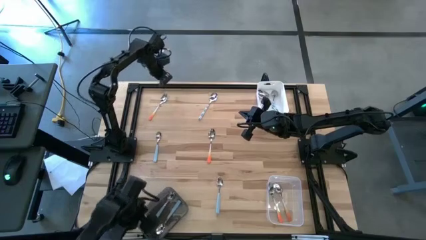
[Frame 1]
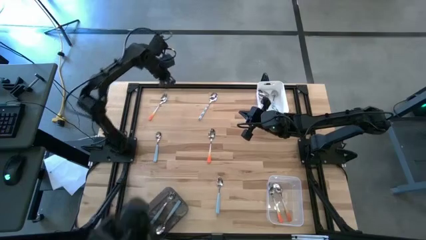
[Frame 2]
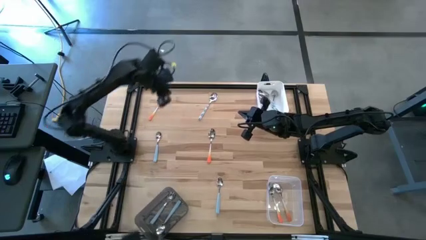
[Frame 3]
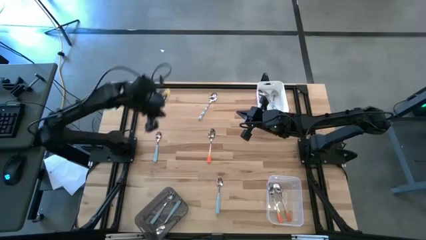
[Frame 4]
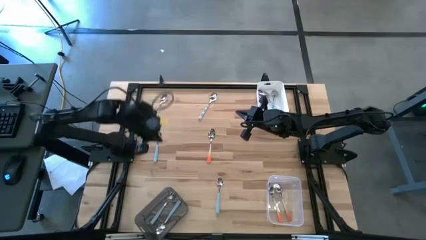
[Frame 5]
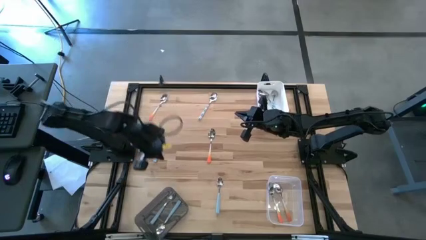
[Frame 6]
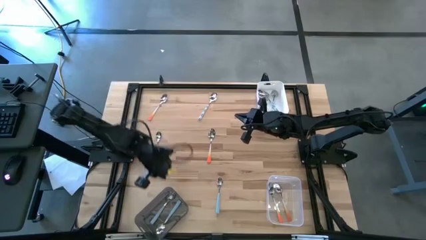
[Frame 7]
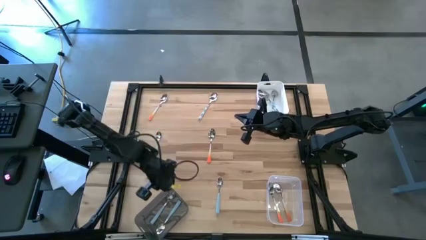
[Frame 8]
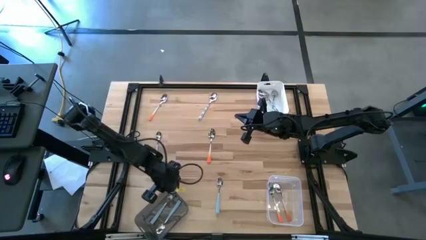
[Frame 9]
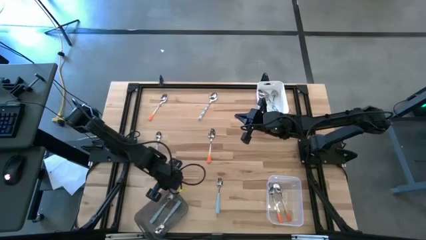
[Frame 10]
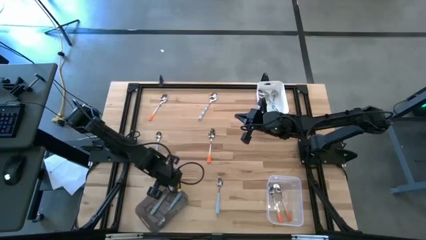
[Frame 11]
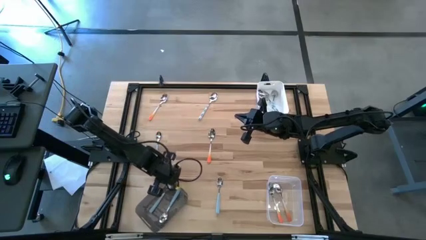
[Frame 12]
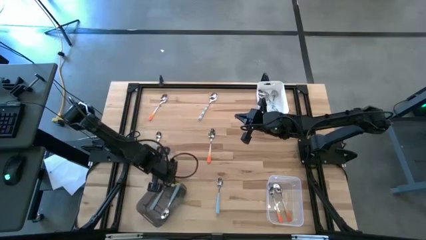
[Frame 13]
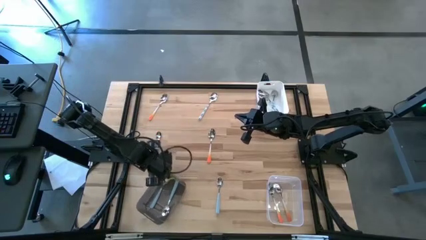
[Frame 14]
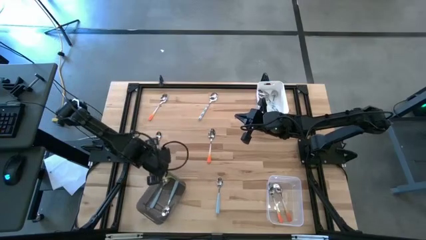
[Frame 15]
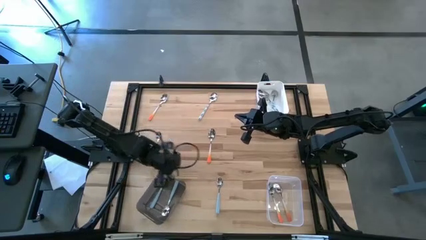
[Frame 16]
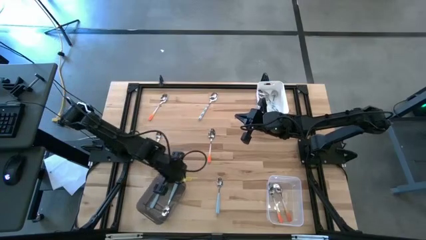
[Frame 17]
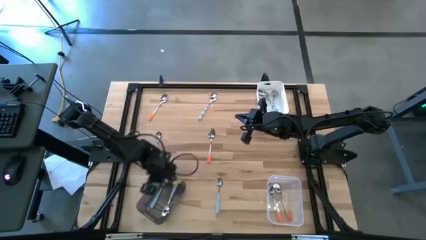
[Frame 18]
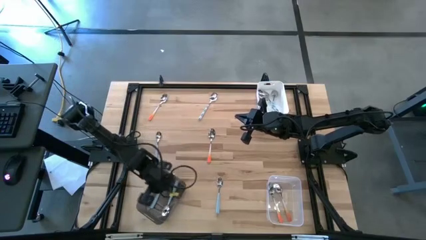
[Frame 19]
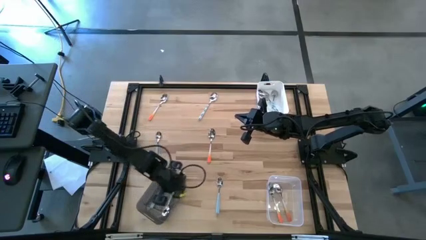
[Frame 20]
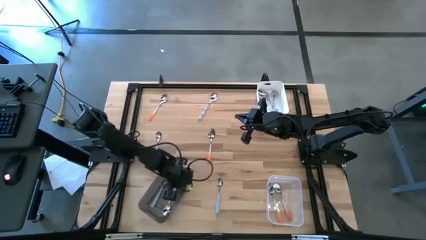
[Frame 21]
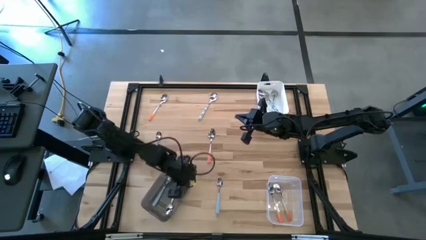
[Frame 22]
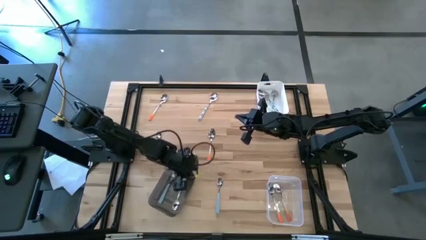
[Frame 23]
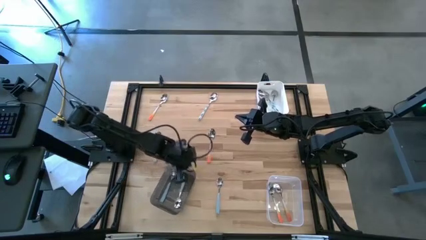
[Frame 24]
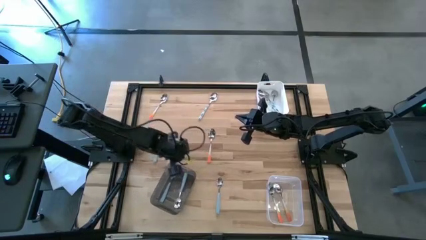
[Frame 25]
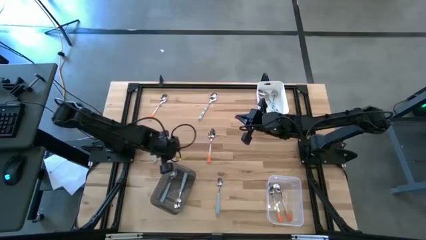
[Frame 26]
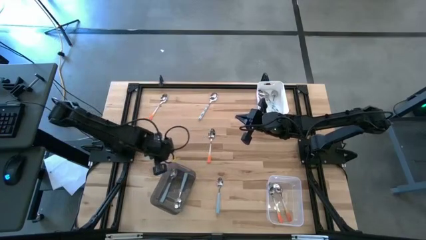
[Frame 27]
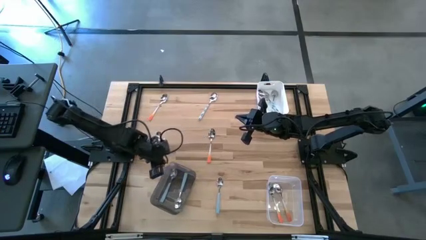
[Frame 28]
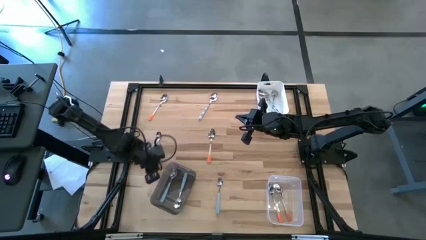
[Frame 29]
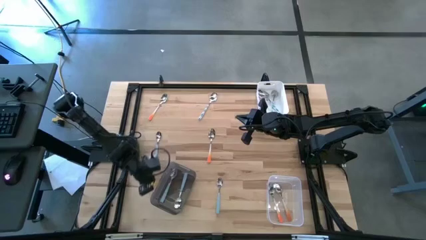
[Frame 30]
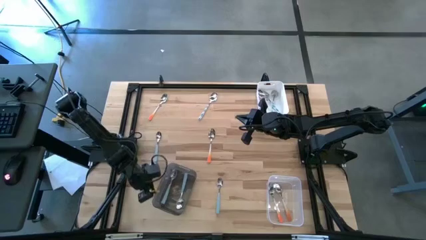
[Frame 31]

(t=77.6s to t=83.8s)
Task: Sort silverware by color (type)
Adjust the black bin

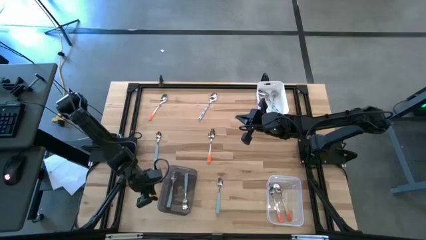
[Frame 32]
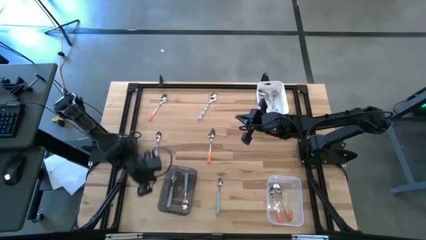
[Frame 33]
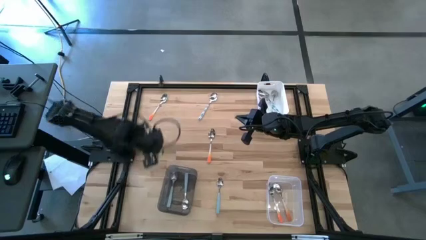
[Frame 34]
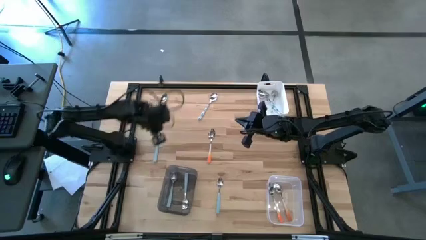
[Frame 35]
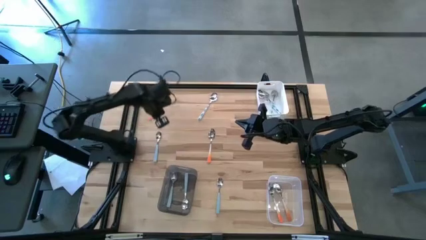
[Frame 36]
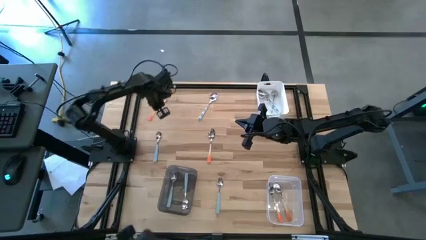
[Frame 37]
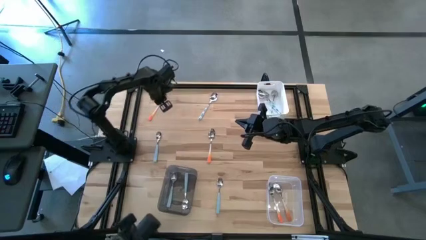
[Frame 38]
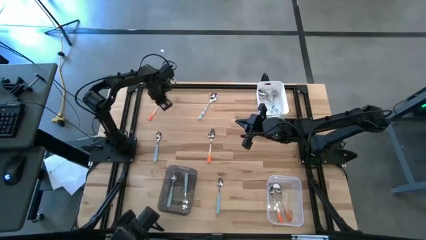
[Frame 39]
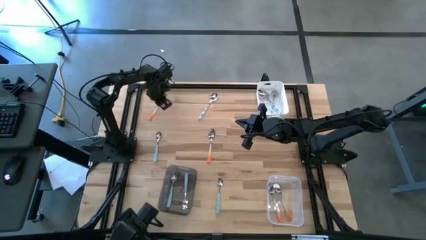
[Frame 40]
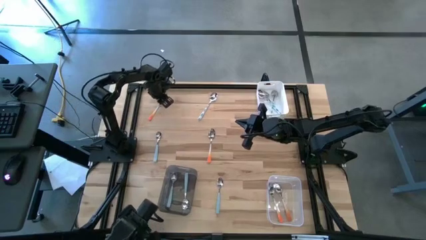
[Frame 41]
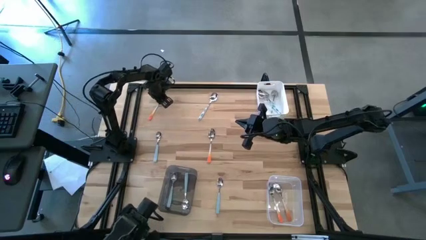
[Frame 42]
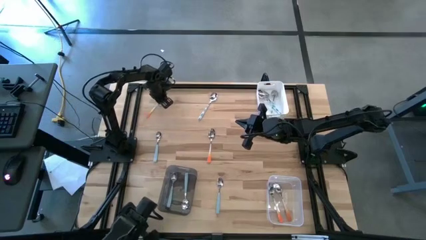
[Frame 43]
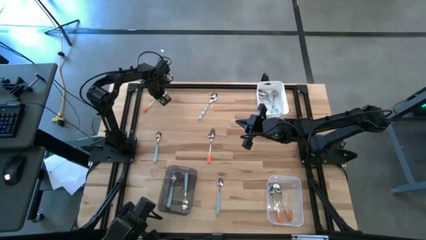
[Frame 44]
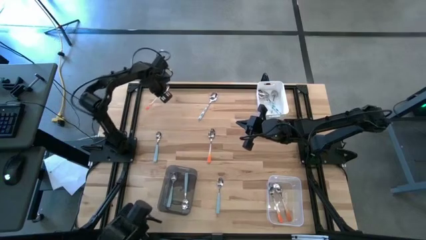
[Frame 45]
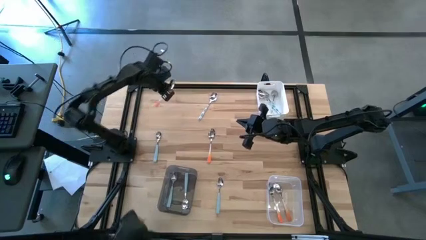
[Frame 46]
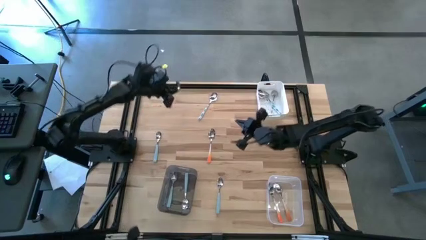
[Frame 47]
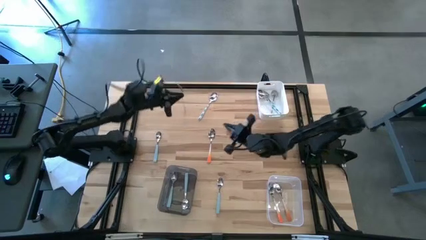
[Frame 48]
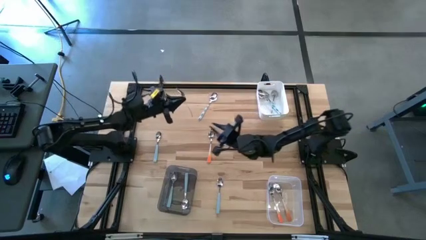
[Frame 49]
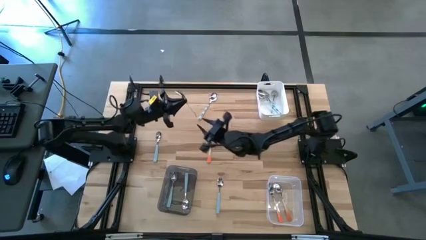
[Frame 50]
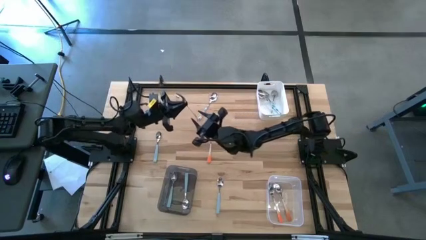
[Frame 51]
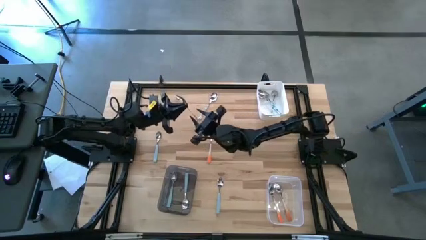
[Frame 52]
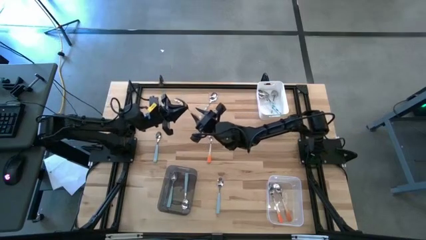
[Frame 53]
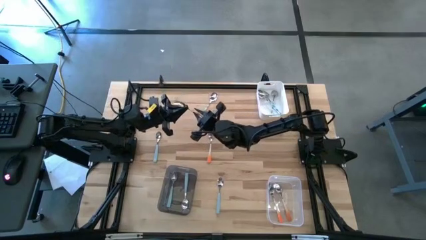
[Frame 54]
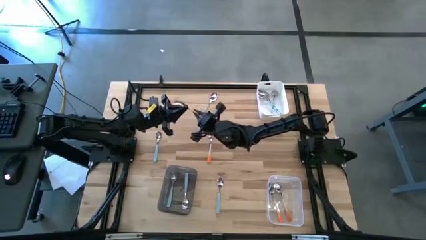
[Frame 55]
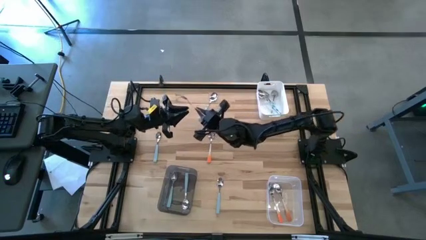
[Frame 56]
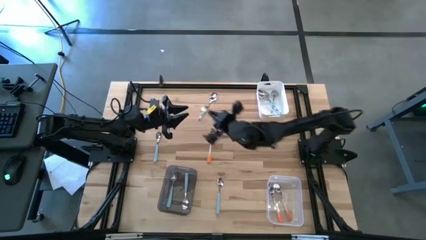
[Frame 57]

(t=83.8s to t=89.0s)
Put the top orange spoon into the transparent bin

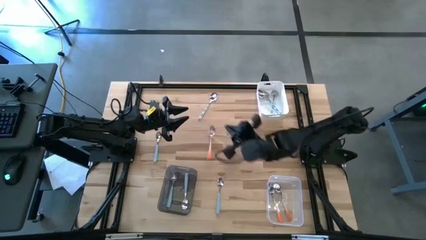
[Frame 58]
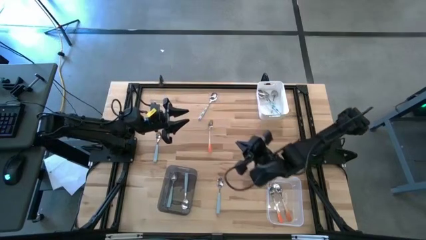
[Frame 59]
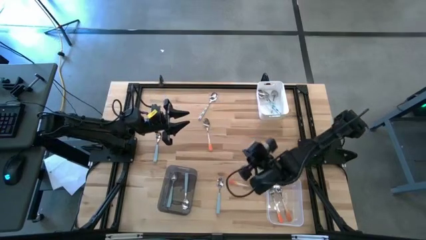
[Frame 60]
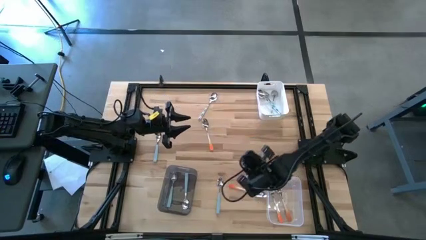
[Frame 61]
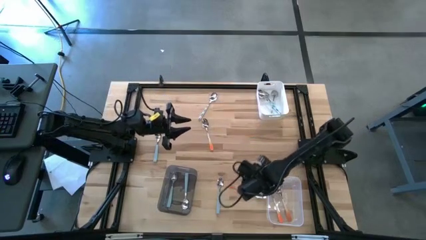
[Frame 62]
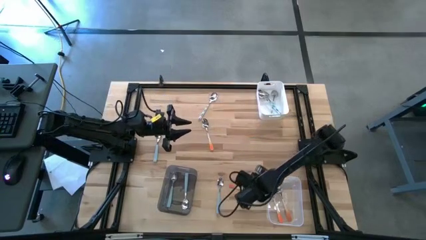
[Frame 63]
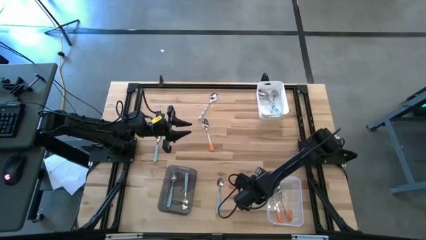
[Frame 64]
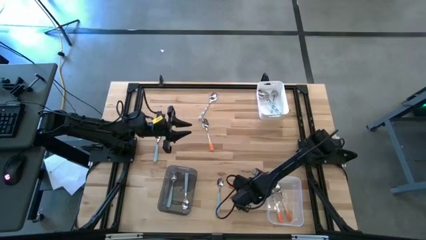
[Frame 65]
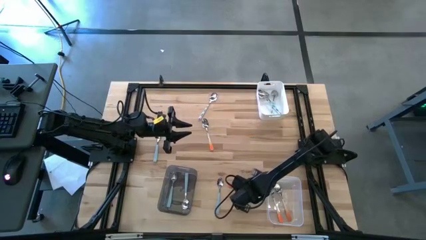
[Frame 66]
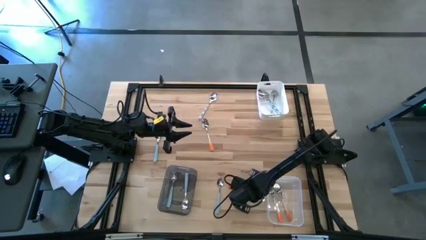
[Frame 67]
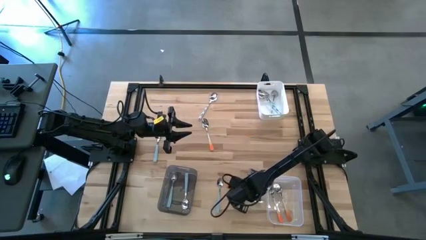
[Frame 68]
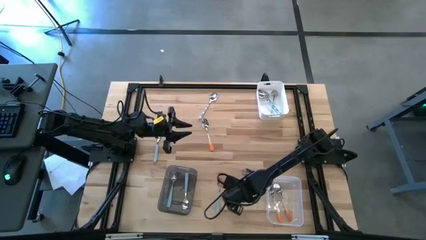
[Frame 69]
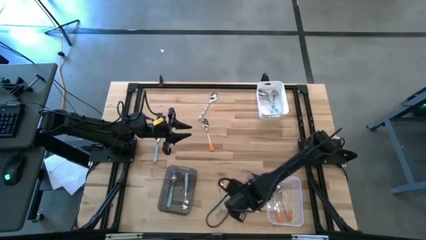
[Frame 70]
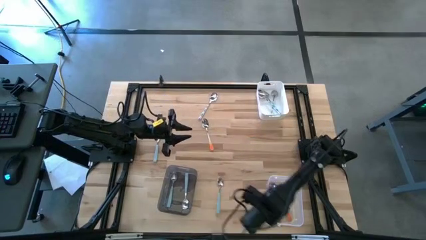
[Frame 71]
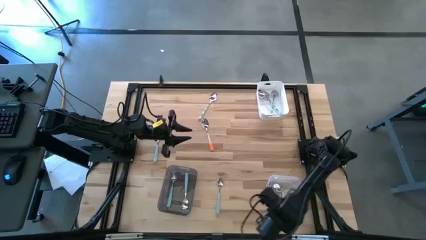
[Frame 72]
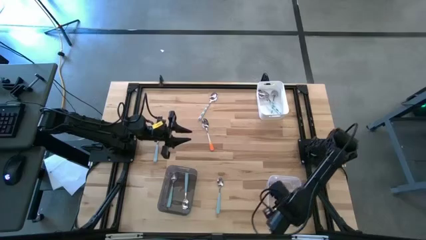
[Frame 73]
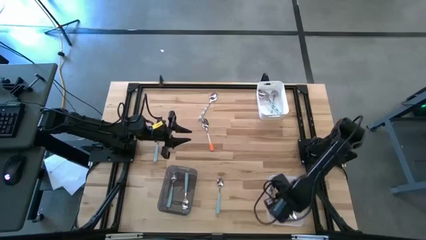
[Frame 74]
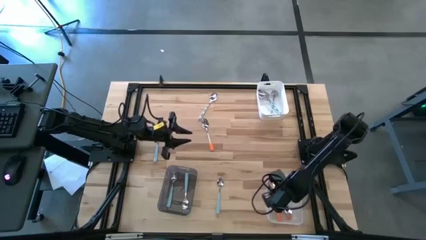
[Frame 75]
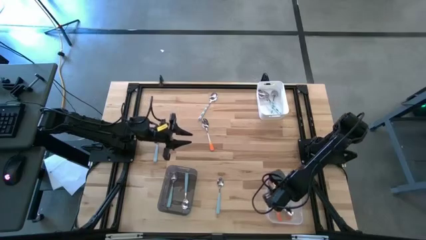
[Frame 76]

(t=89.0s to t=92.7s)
Put the top orange spoon into the transparent bin

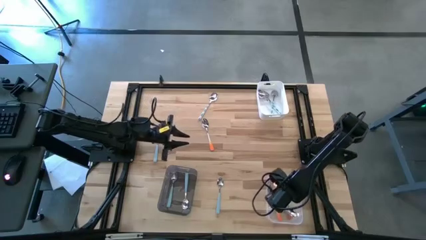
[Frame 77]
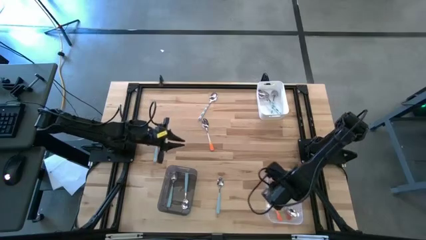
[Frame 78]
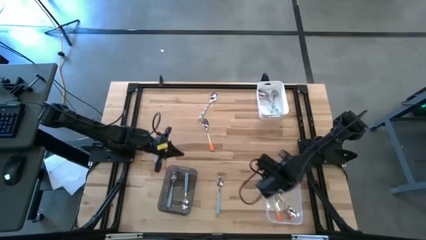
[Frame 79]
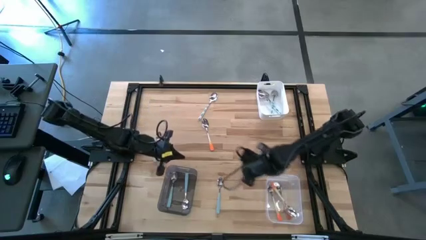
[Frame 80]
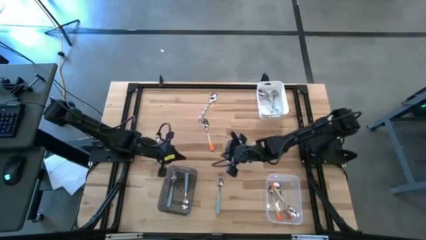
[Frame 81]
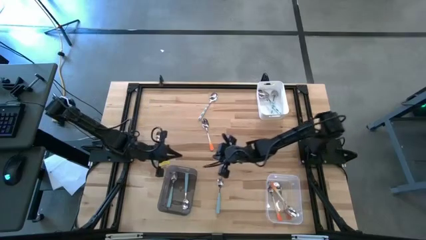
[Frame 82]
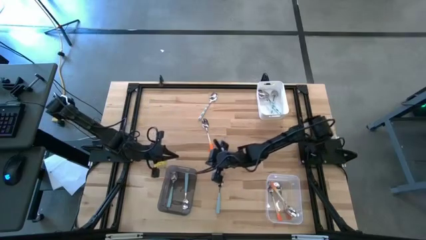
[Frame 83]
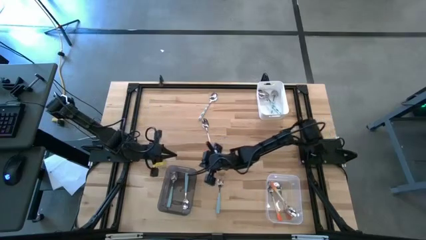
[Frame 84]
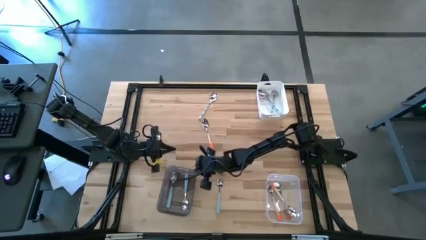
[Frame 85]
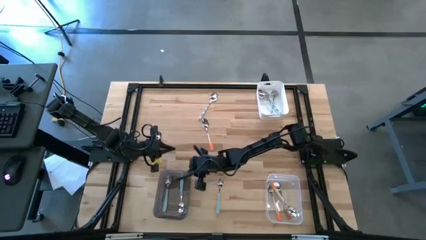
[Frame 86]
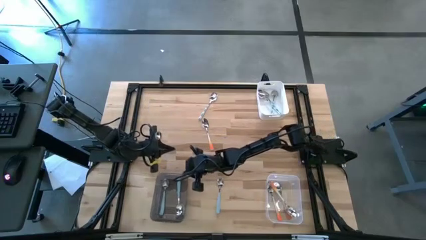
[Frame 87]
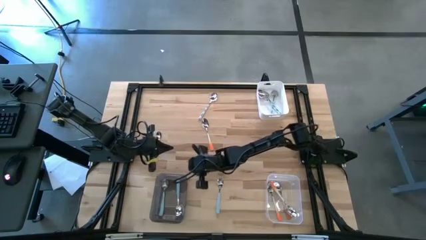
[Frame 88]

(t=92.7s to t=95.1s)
Adjust the black bin
